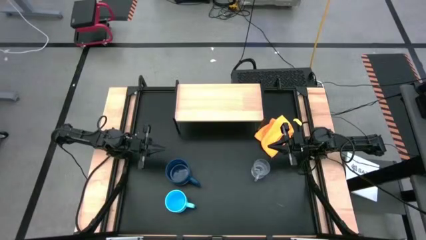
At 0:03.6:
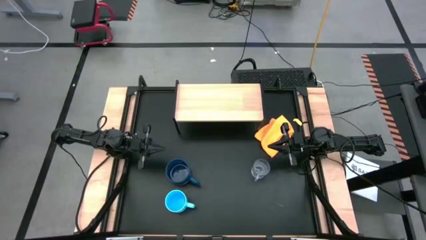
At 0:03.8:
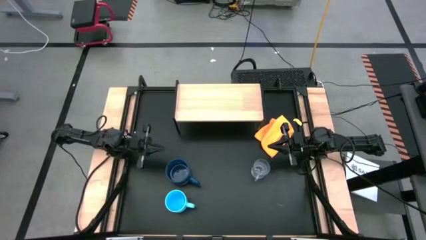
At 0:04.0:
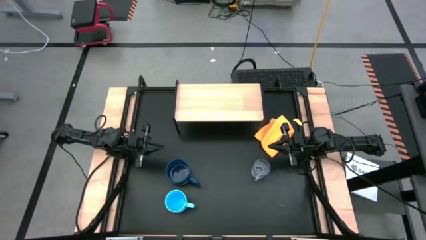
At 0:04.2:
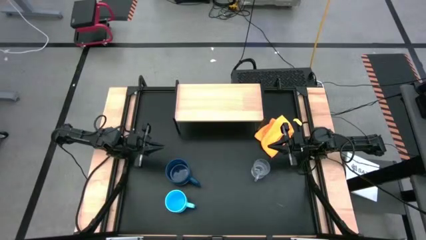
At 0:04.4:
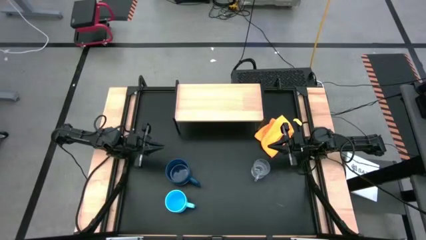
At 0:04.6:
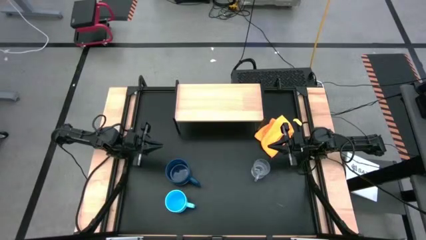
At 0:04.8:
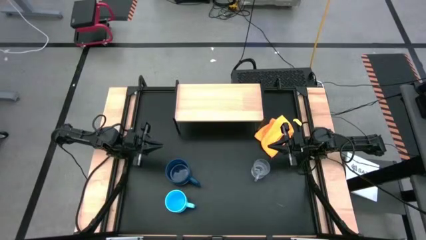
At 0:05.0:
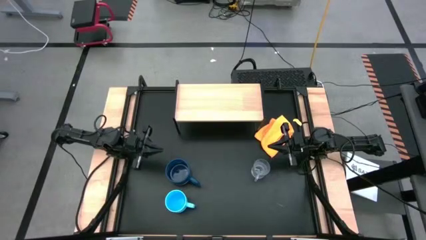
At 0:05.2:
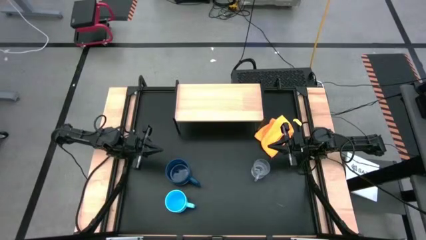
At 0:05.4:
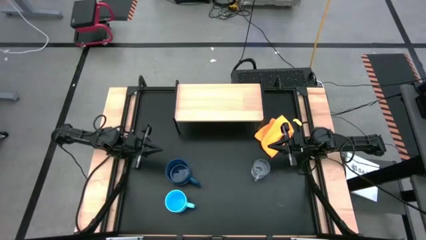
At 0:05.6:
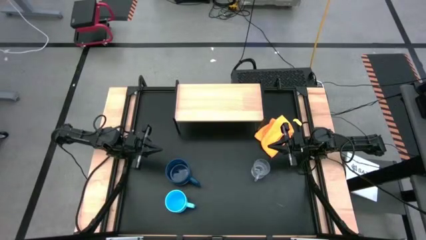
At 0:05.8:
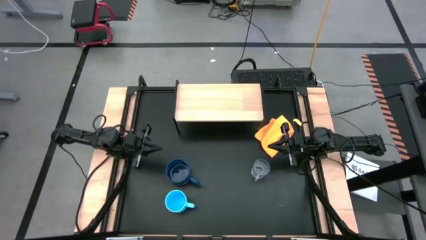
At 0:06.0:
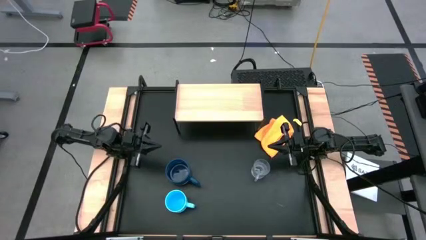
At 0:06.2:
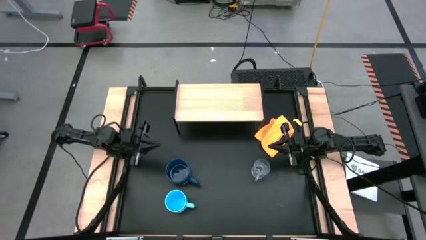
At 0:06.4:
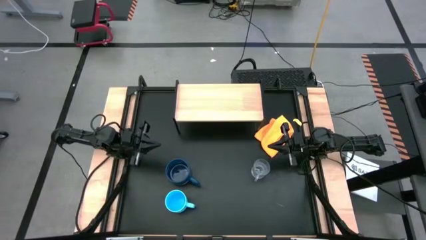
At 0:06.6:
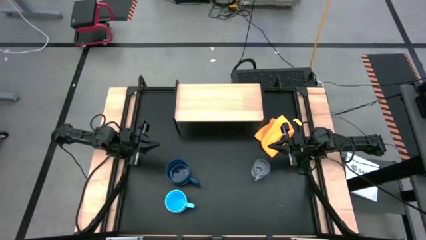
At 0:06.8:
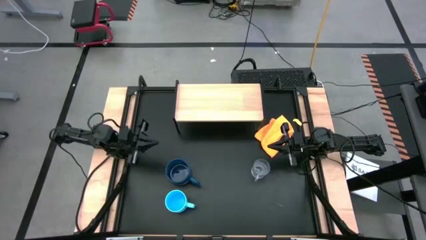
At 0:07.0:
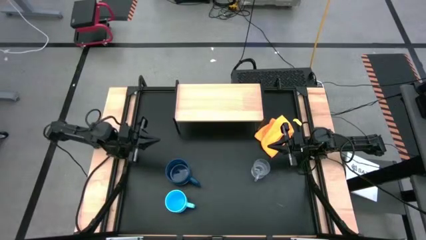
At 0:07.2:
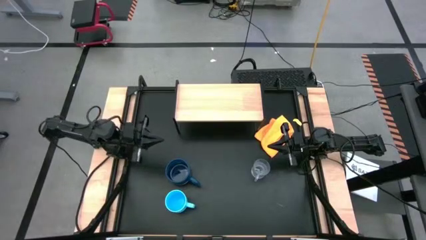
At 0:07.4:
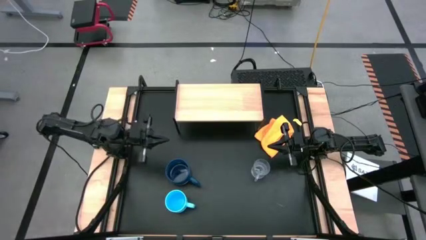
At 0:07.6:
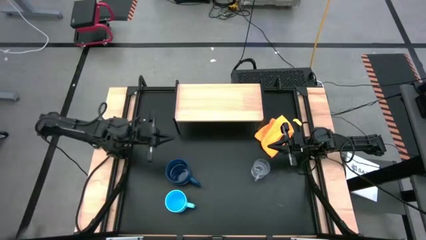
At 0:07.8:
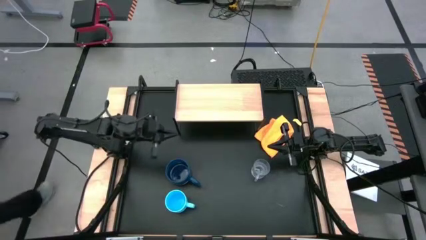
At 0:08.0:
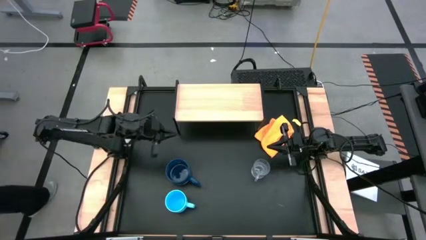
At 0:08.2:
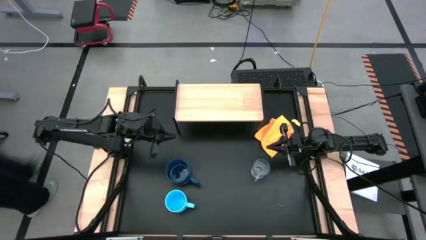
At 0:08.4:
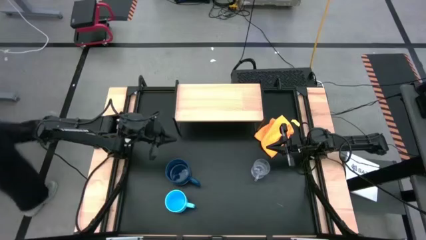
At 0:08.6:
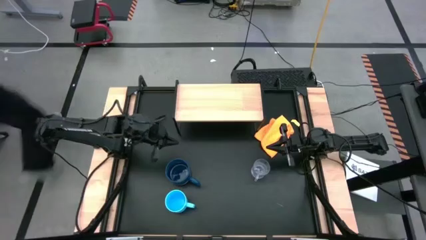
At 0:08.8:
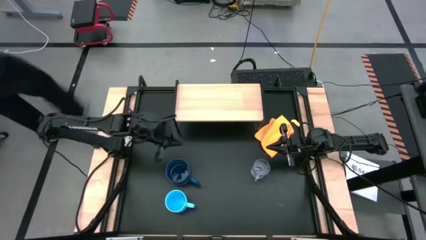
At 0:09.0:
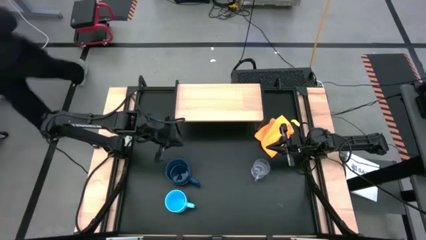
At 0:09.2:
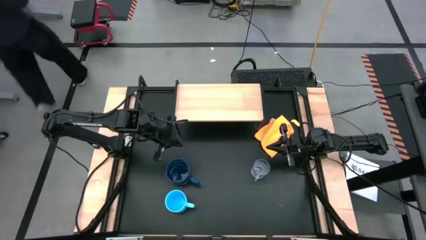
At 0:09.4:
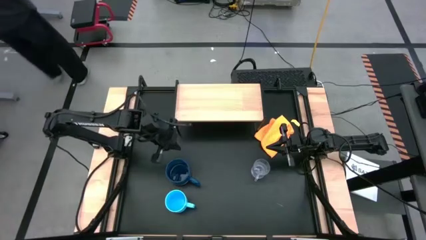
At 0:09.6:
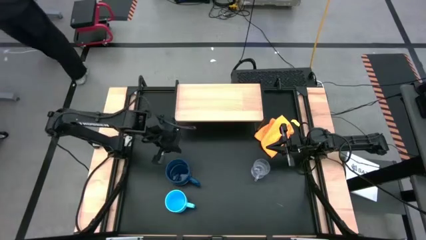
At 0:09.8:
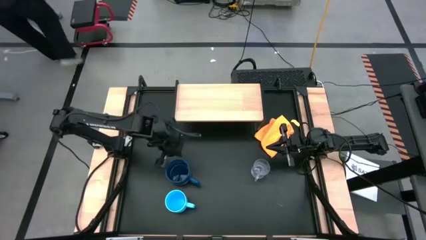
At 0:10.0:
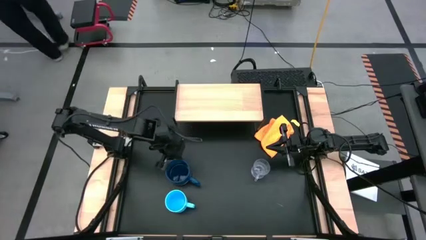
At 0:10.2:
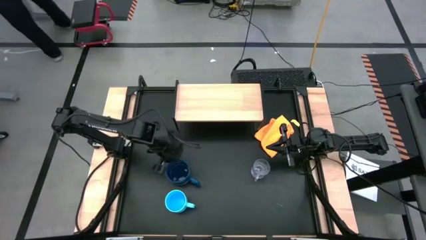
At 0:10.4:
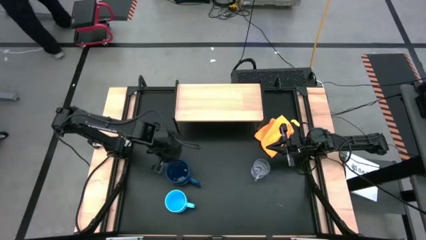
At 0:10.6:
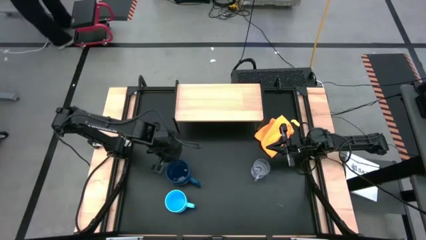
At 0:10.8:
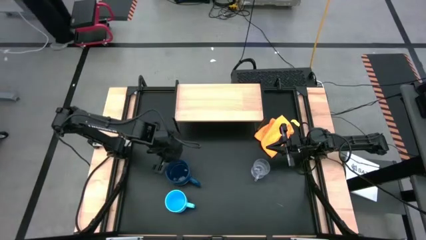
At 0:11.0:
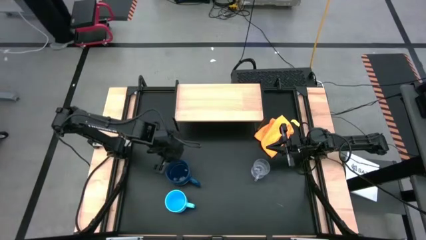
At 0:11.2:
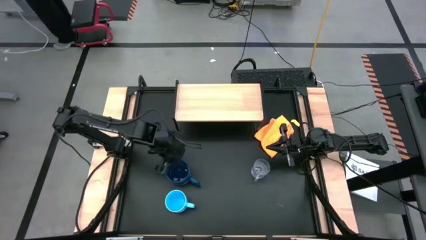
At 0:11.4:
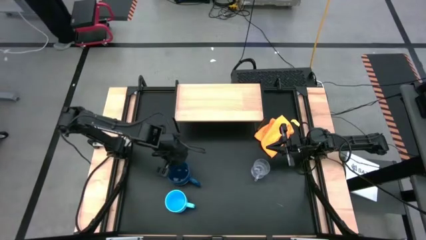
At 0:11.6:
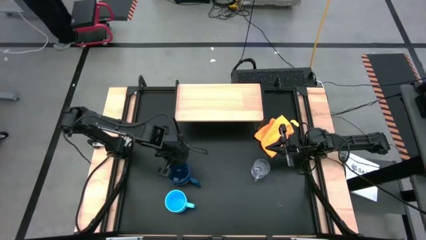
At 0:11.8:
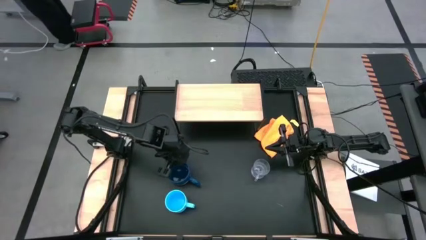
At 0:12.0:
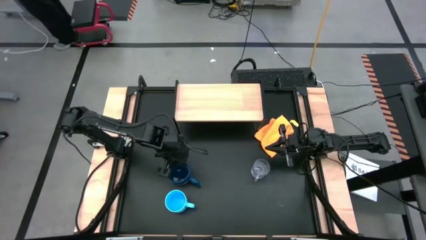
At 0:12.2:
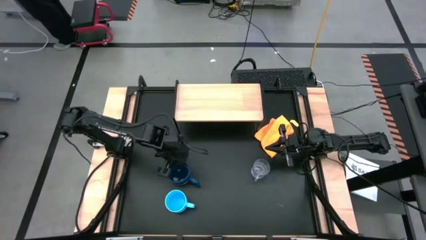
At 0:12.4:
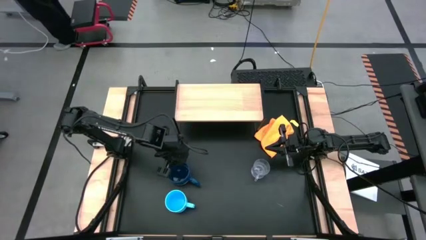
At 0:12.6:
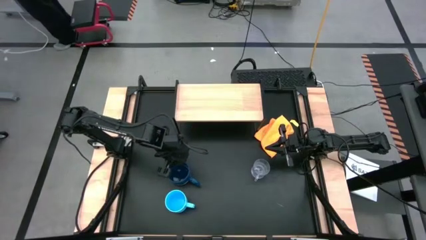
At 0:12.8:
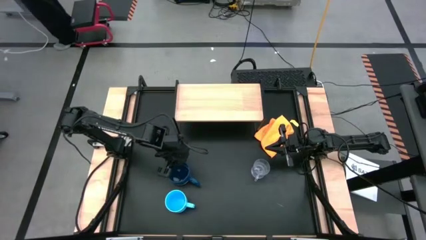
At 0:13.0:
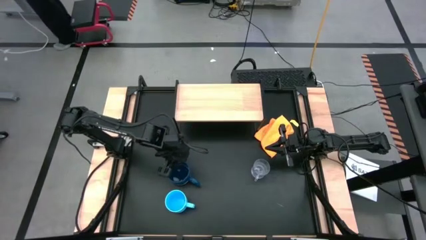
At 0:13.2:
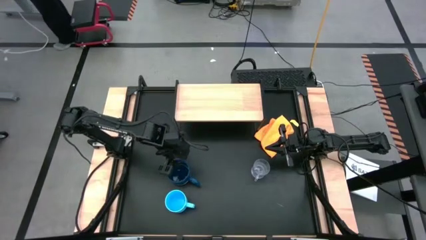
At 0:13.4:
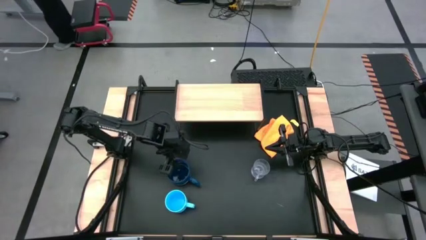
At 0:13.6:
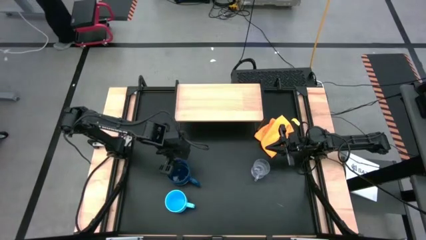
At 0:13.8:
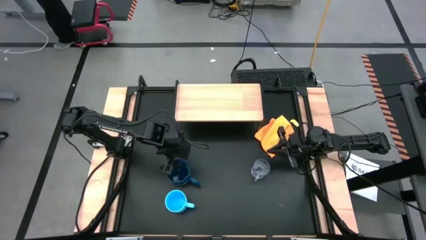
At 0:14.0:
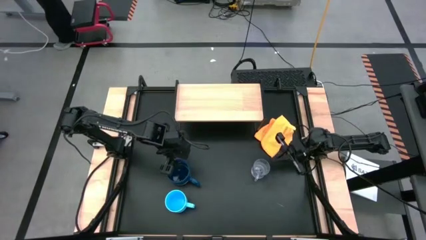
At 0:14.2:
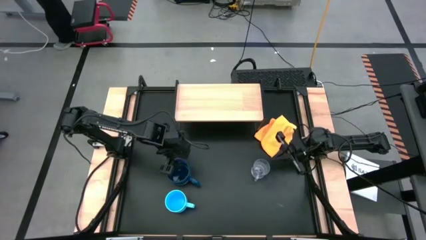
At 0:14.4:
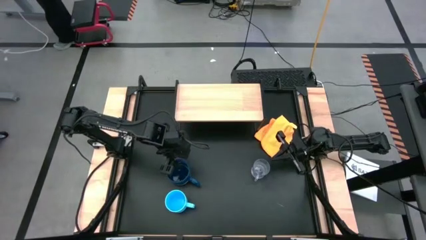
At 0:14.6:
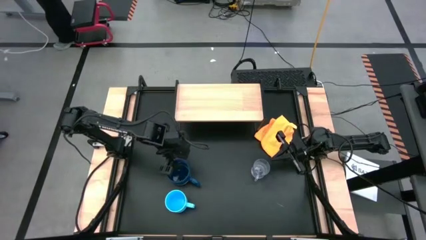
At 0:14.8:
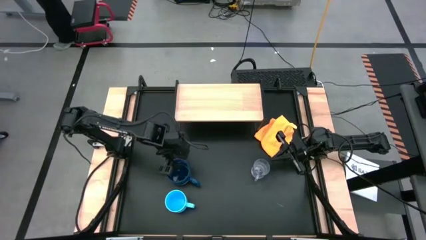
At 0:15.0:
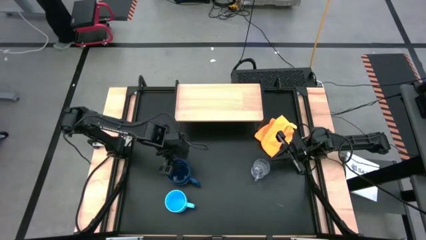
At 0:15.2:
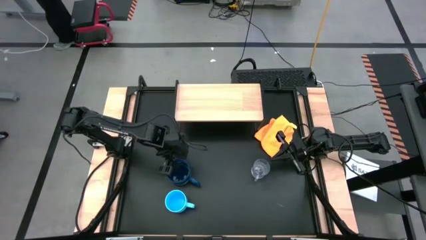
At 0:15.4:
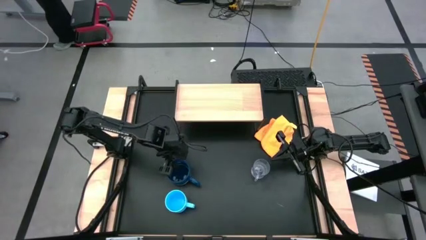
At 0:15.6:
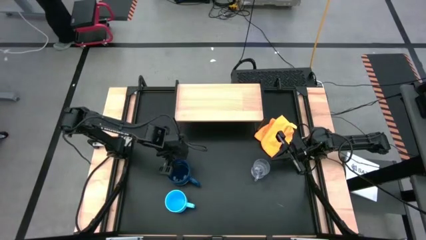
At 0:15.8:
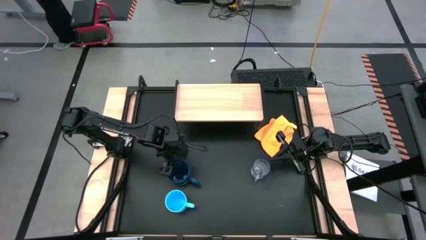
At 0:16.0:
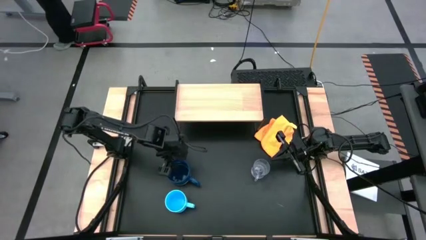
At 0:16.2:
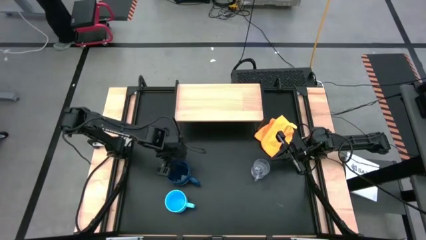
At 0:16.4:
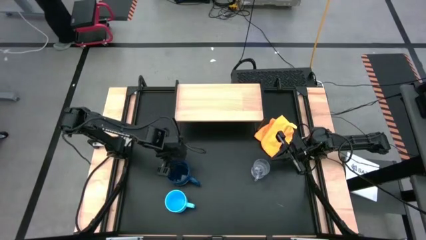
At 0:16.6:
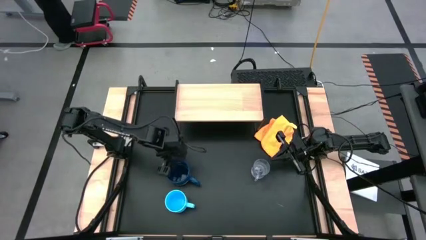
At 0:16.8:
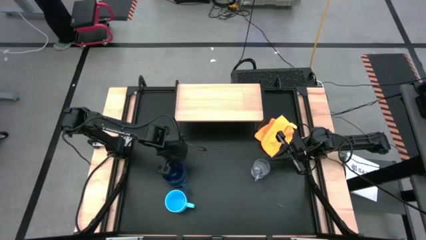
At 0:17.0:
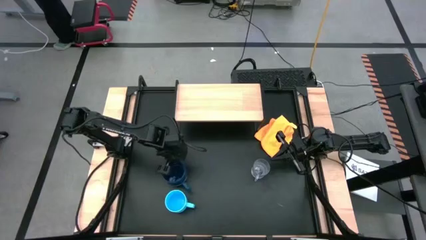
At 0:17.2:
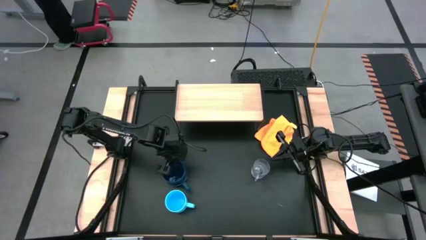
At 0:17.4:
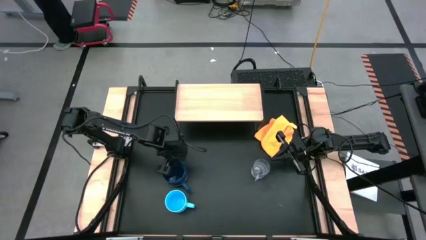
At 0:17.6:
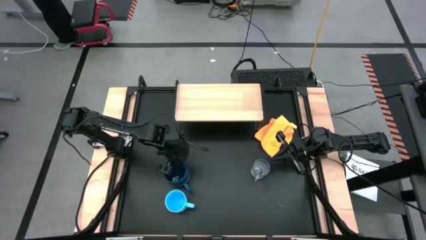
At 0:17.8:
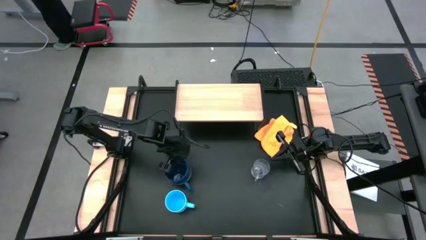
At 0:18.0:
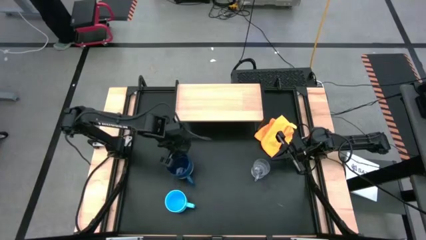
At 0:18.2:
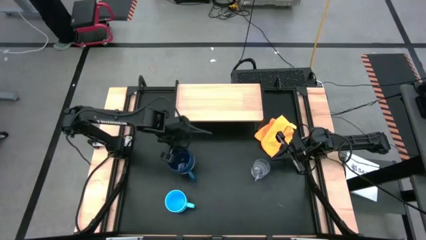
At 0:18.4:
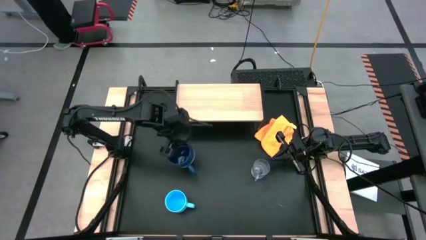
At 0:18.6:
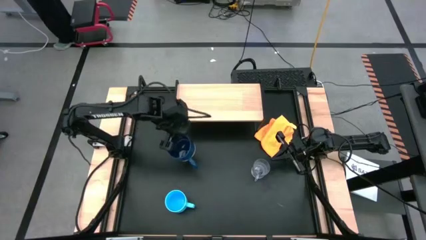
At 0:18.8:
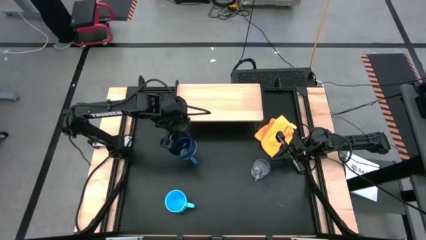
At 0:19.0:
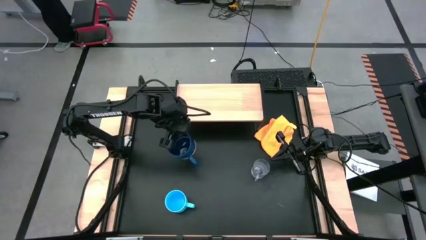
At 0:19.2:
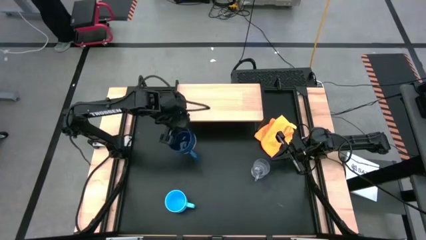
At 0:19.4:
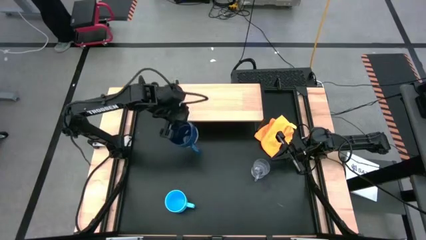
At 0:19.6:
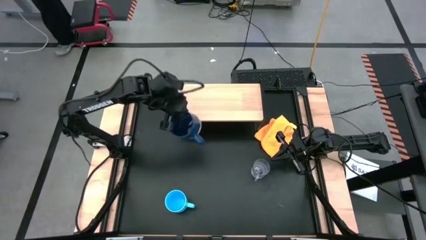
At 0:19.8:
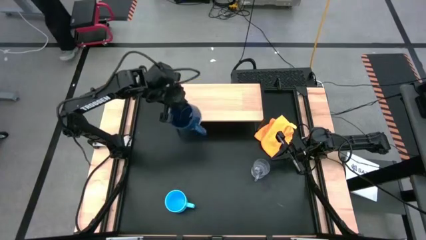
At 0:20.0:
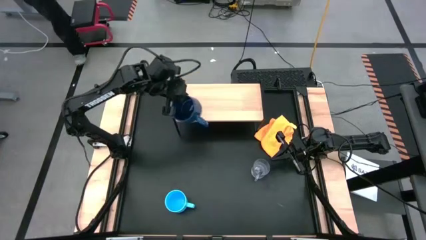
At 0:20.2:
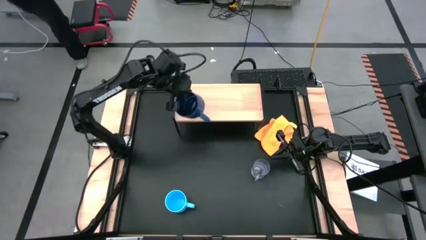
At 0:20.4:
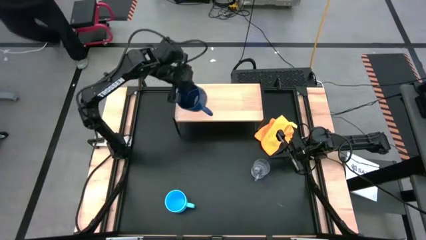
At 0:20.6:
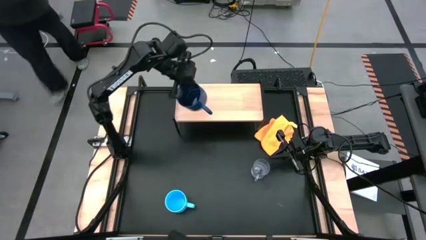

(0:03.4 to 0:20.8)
Task: Stack small to large cups/mugs on shelf
Put the dark blue mug on the shelf
